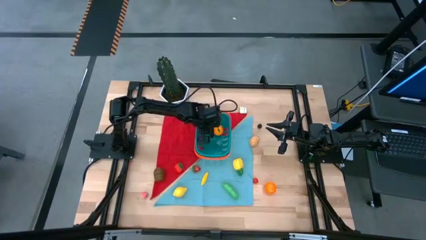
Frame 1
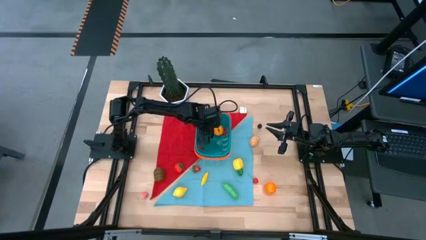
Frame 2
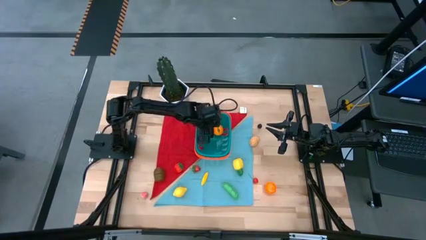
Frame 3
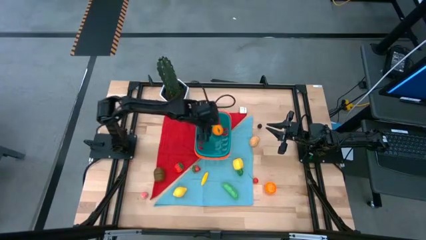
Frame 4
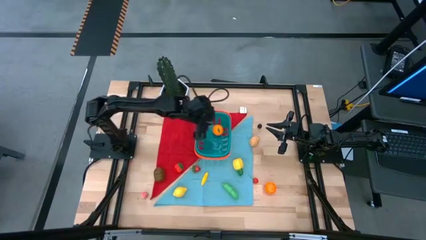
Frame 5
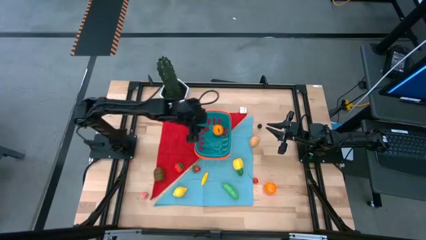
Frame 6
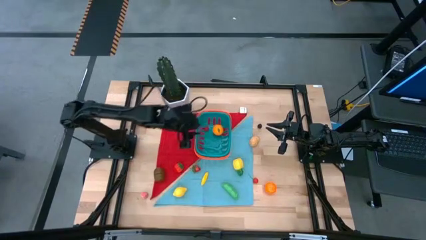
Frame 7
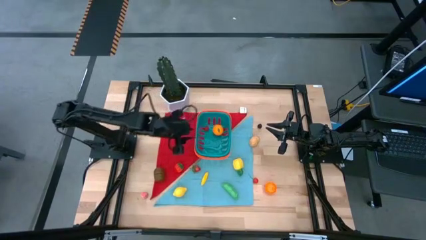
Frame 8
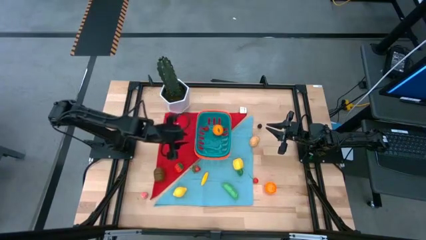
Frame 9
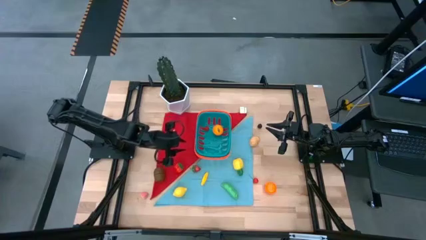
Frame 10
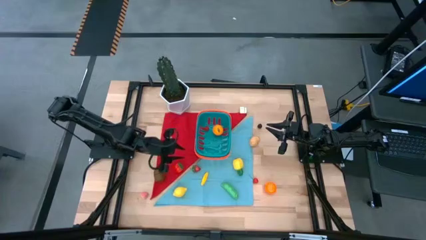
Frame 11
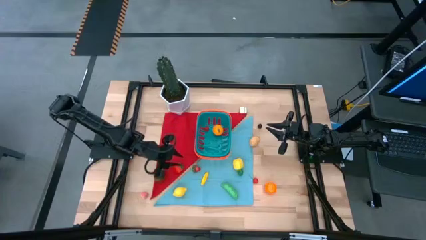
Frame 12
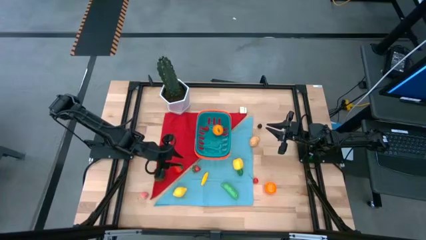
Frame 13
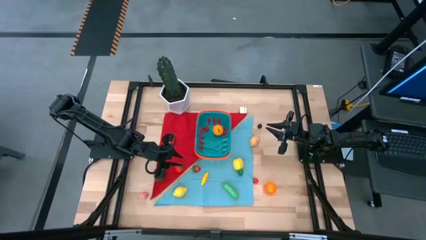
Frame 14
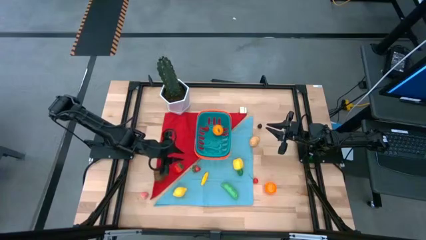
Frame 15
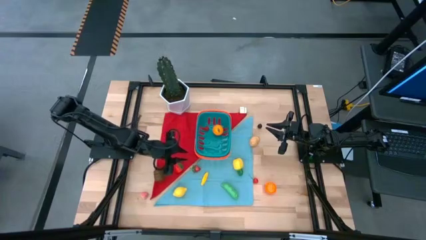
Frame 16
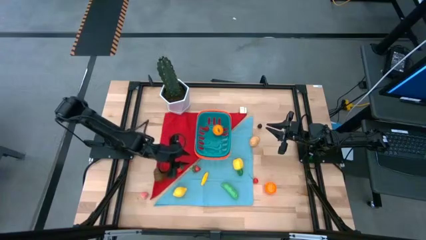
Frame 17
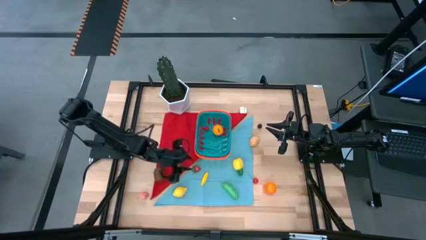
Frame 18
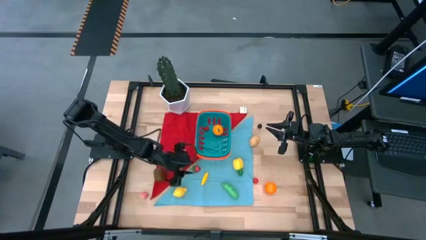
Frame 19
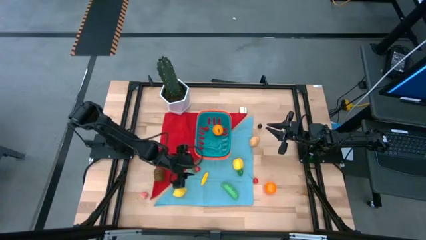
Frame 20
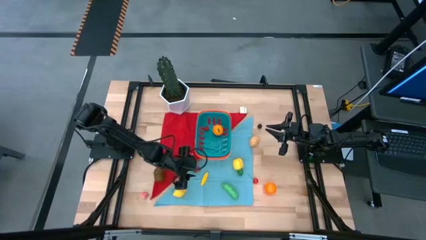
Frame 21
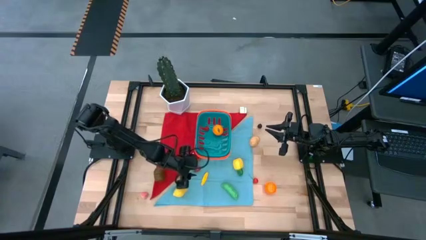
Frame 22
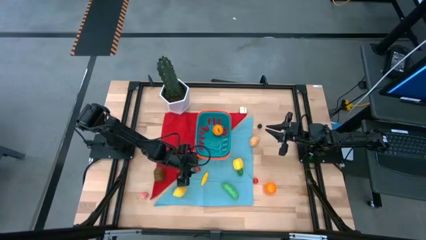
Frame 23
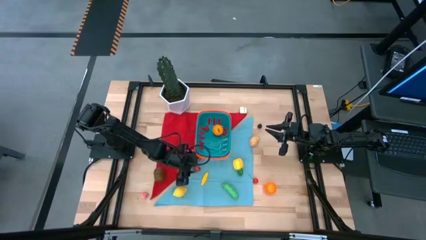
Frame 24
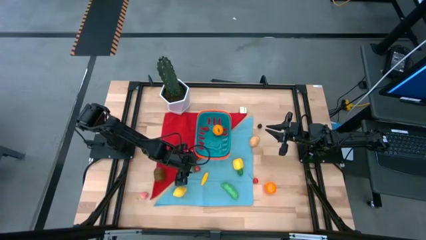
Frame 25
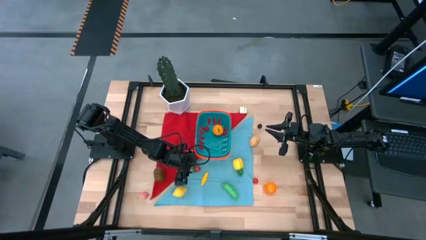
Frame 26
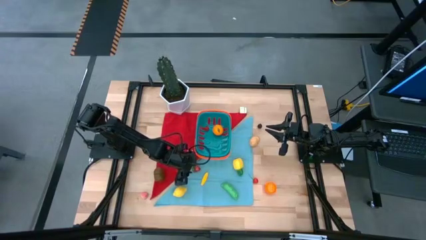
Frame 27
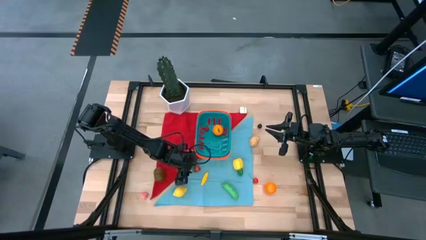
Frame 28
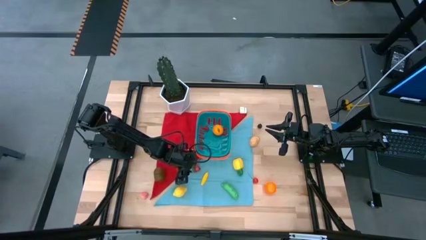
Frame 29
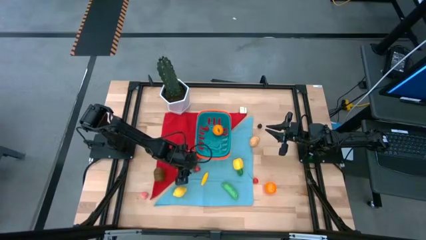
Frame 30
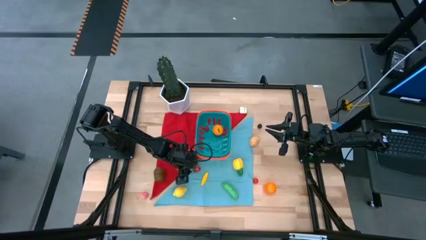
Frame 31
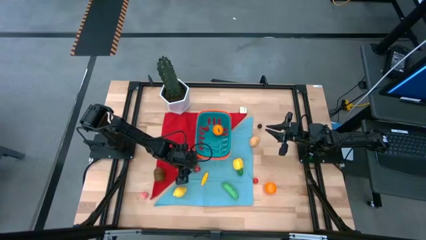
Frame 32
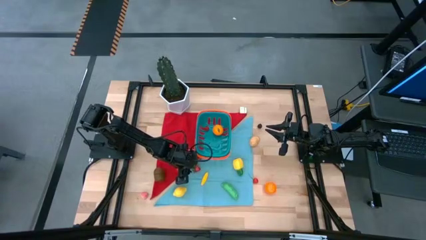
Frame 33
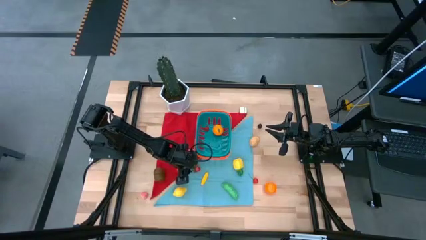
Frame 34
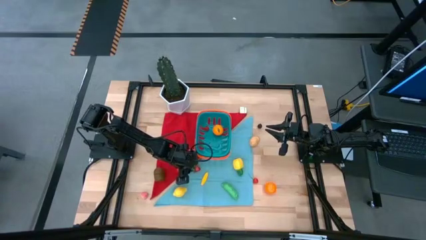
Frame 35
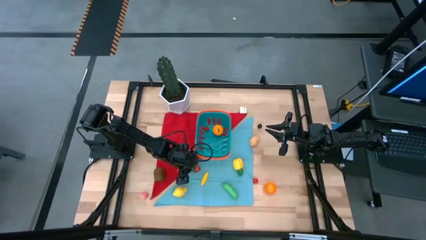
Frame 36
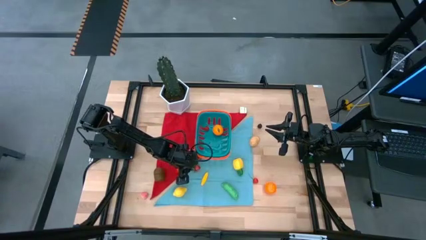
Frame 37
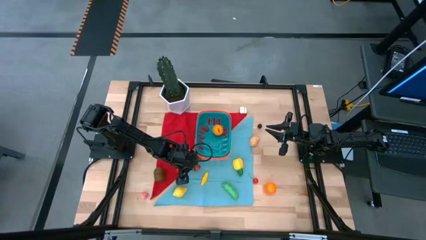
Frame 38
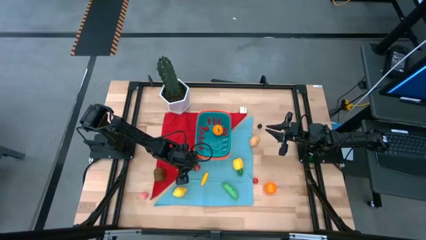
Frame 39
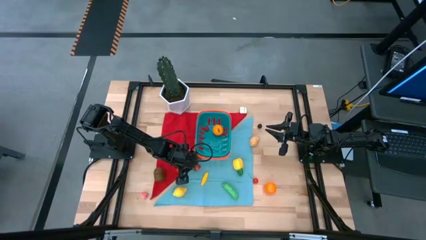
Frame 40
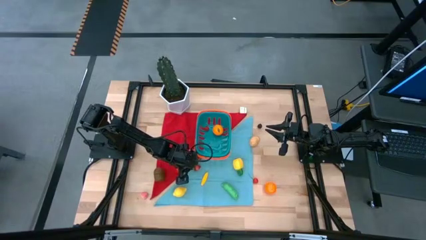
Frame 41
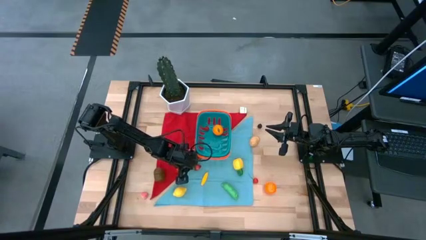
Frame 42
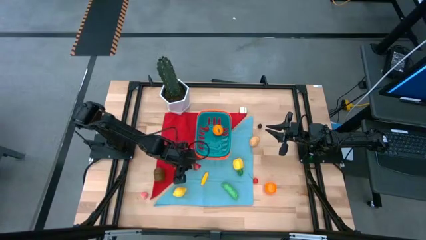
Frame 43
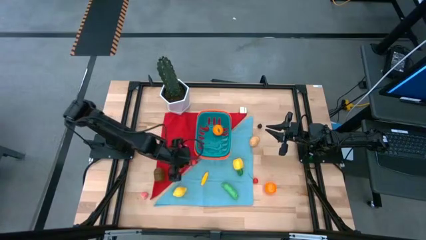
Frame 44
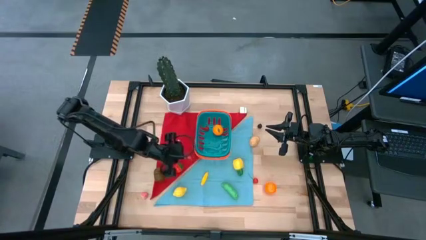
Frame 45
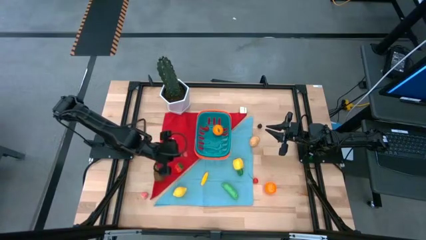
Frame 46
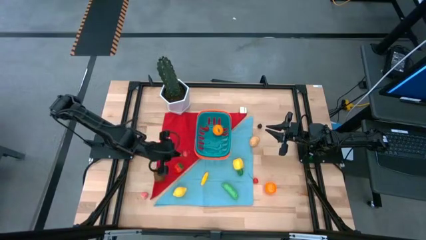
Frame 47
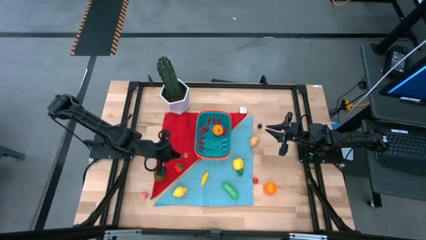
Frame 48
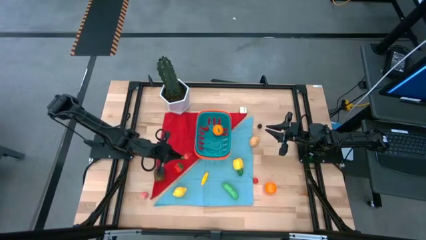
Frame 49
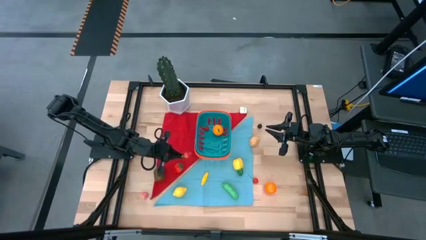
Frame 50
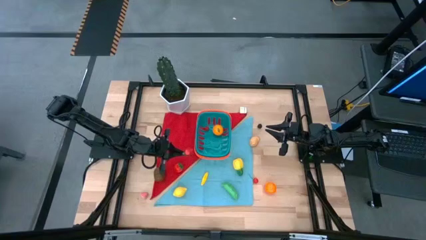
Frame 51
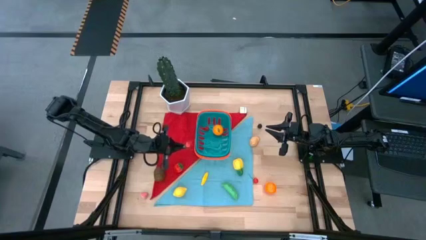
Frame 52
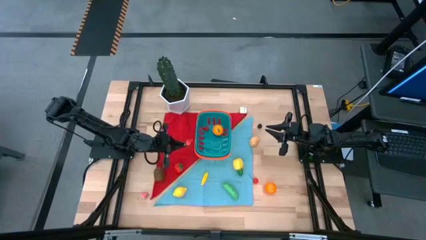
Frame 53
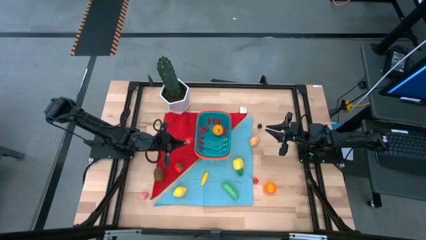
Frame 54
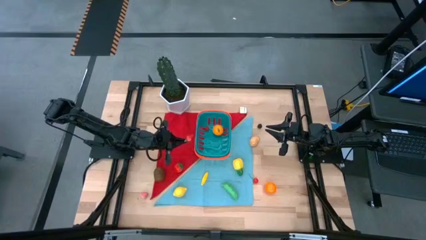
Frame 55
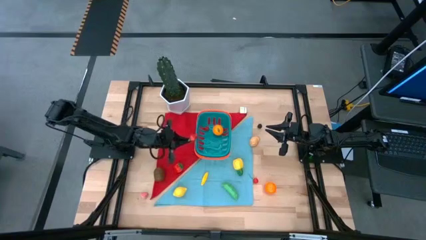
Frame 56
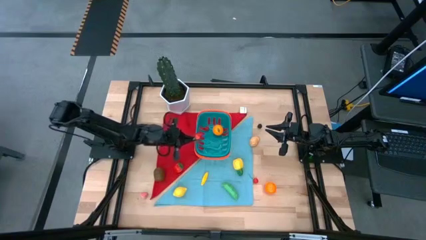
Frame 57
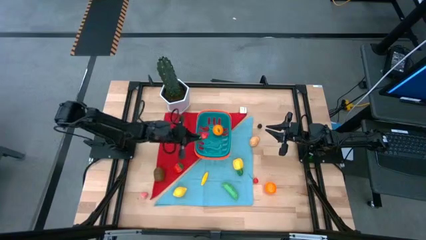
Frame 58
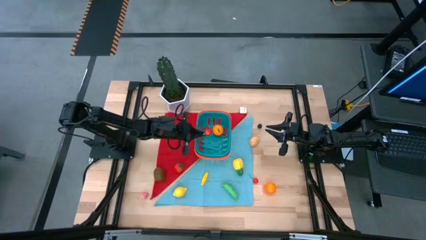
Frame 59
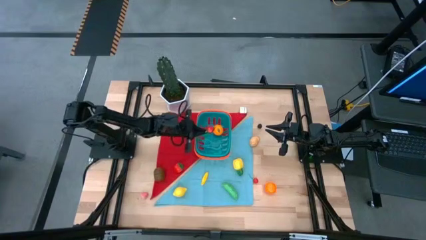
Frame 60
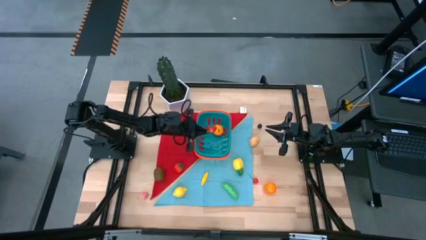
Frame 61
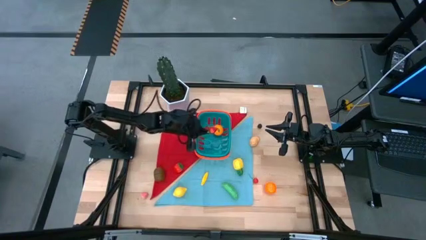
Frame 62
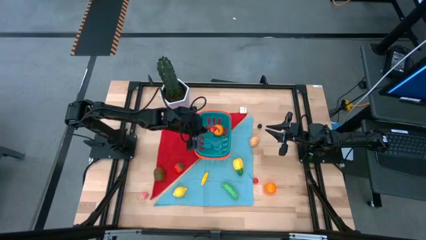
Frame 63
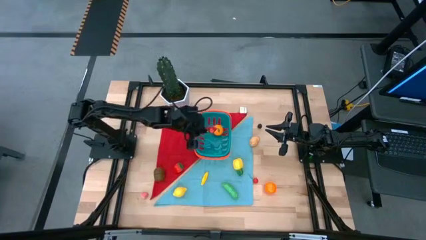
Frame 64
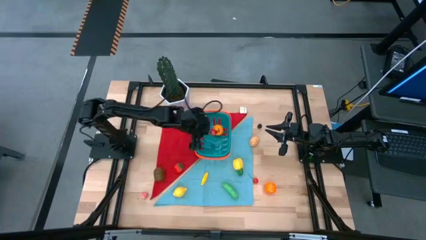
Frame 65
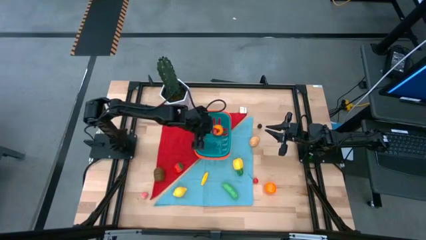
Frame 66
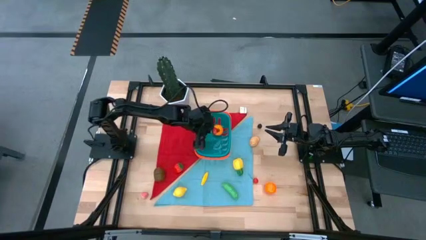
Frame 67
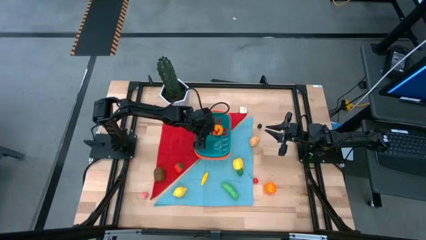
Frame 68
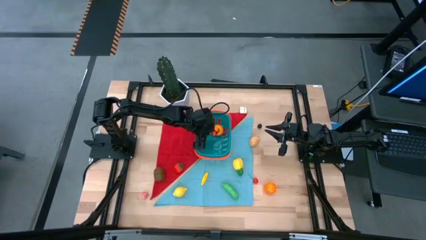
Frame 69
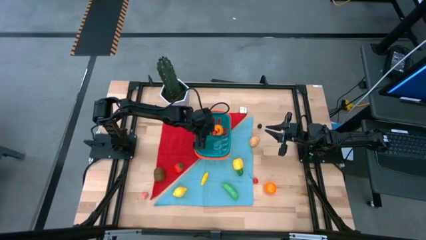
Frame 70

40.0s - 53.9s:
Task: Pick and placing Produce into tupperware
Put the right strawberry into the basket

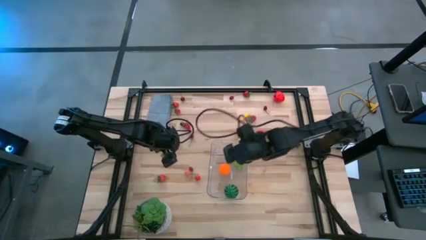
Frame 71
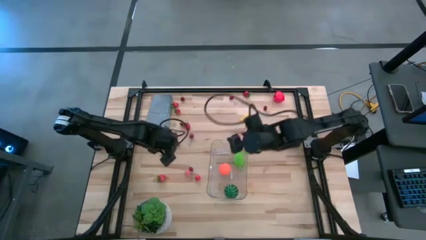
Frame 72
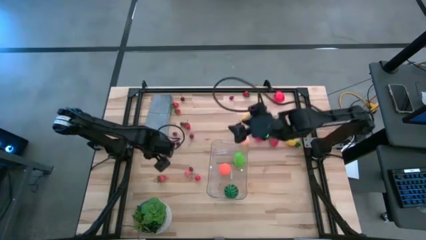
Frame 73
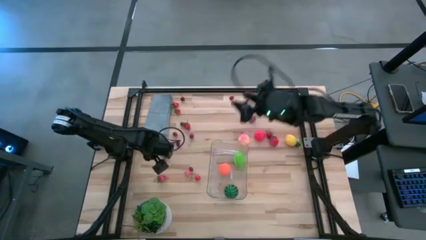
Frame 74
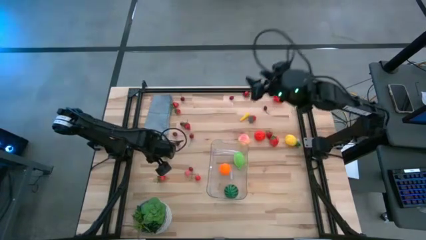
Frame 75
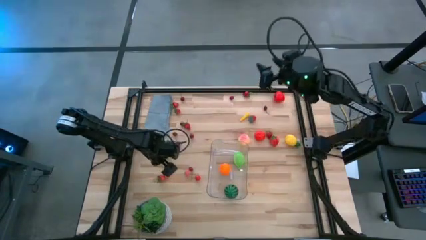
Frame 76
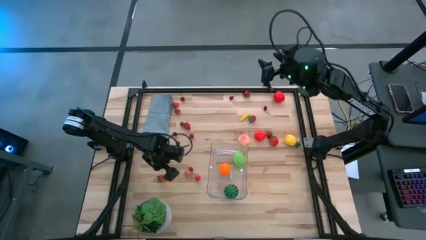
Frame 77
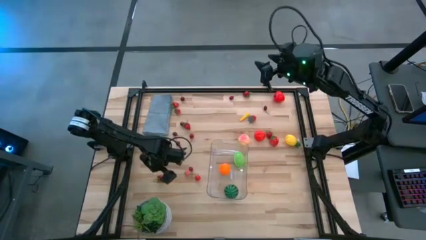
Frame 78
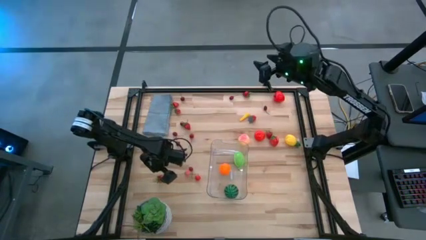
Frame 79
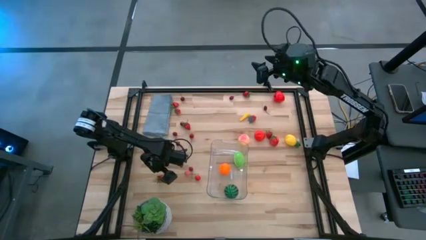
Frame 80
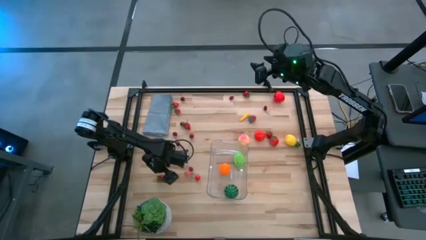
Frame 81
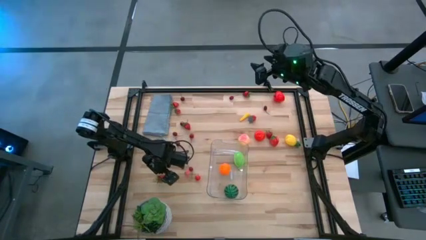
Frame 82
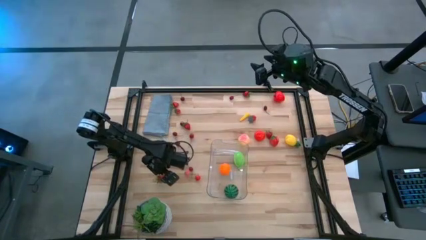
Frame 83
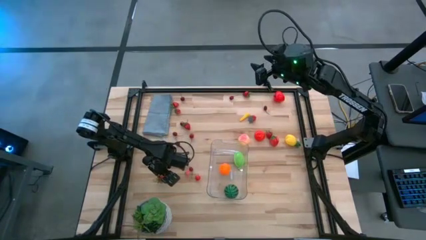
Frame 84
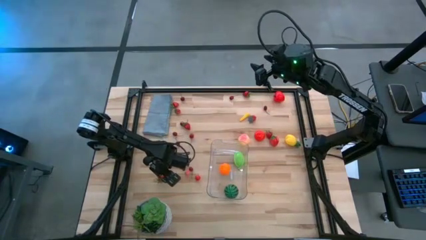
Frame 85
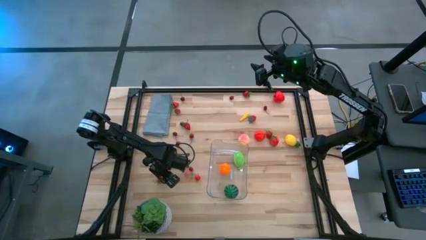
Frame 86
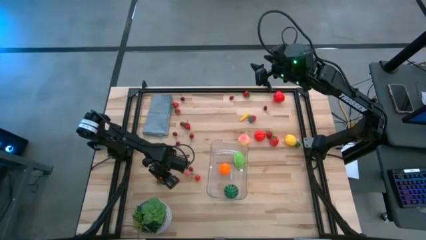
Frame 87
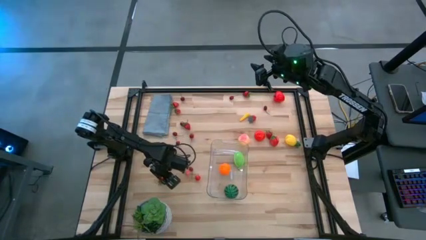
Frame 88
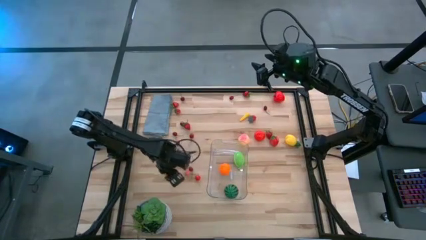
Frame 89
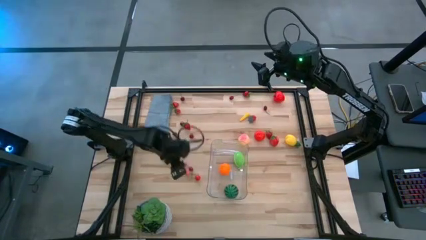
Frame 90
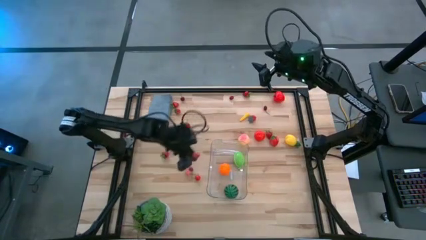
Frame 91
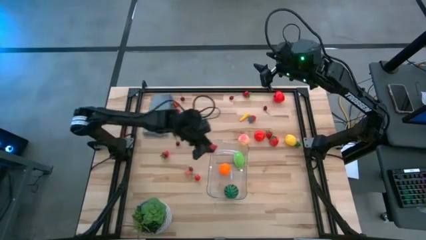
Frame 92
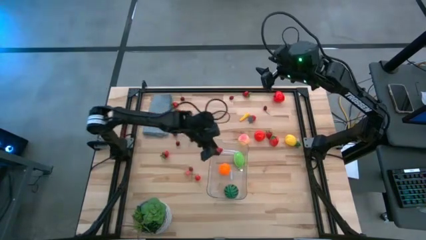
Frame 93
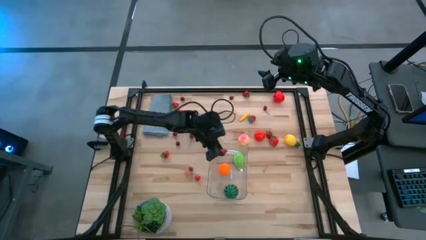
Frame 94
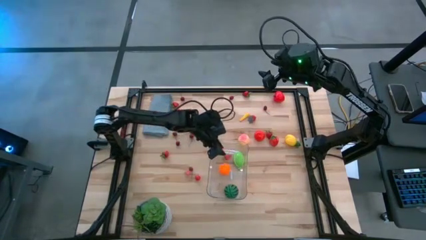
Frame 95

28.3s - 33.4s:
Task: Pick and placing Produce into tupperware
Put the strawberry into the transparent bin
